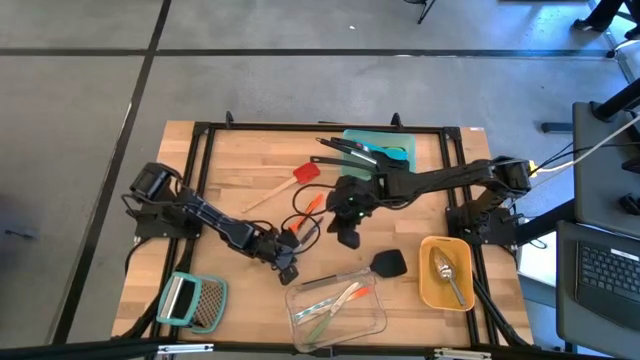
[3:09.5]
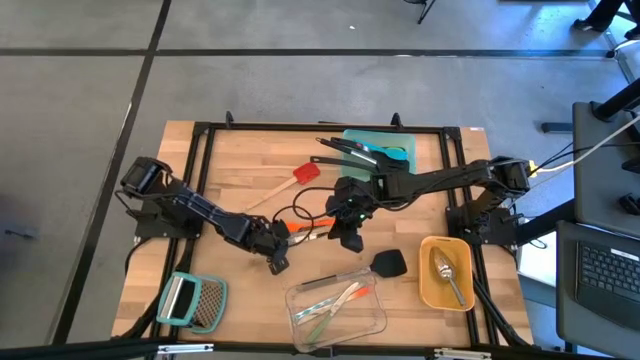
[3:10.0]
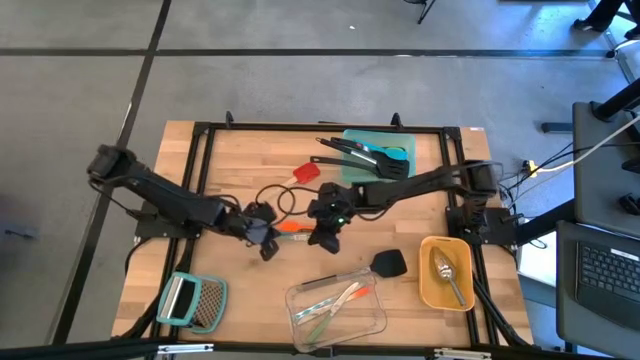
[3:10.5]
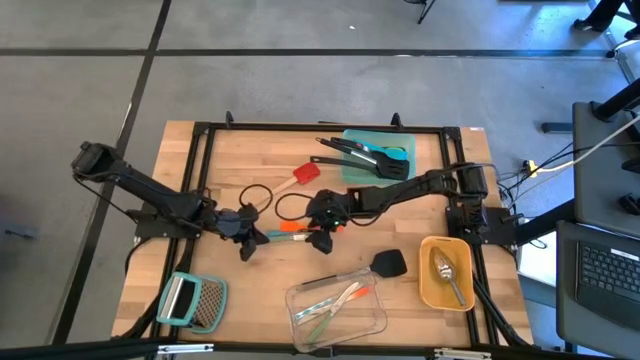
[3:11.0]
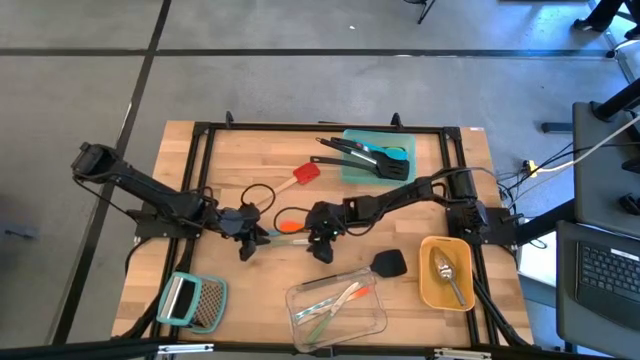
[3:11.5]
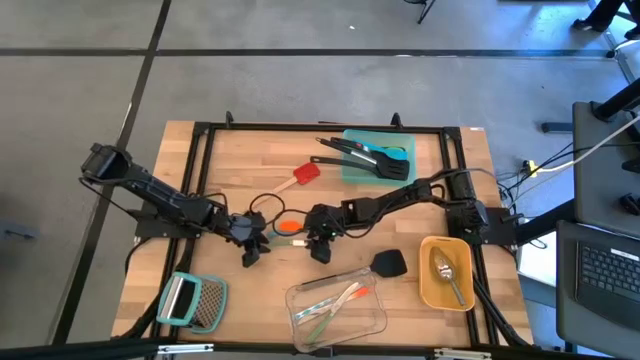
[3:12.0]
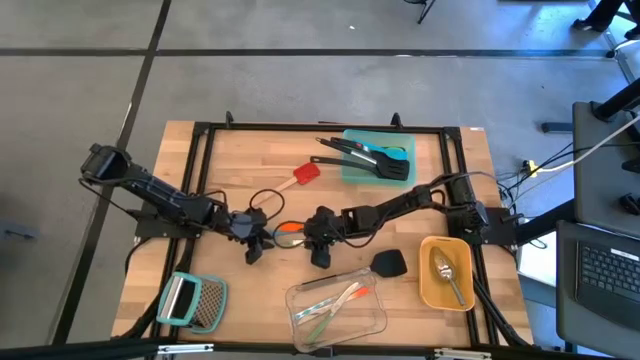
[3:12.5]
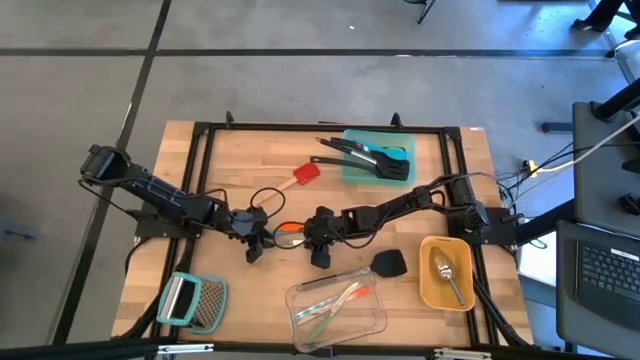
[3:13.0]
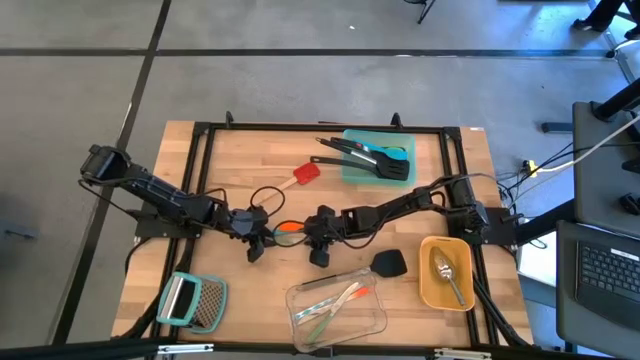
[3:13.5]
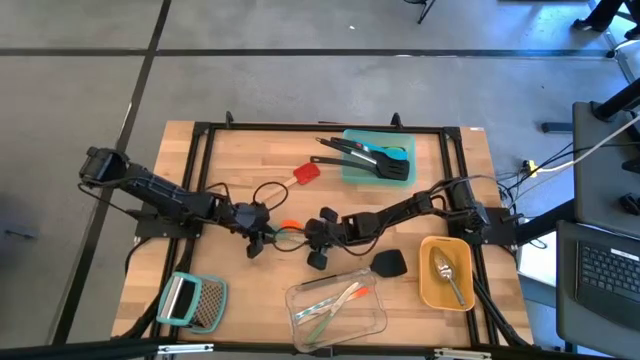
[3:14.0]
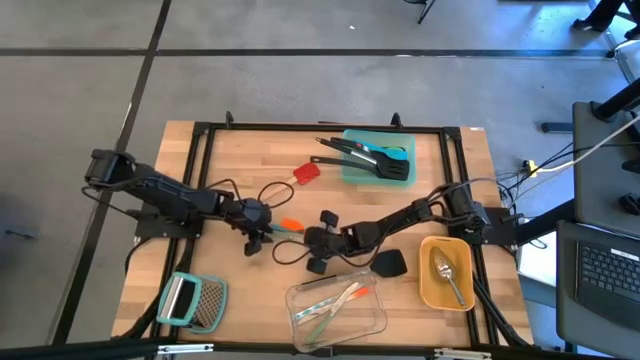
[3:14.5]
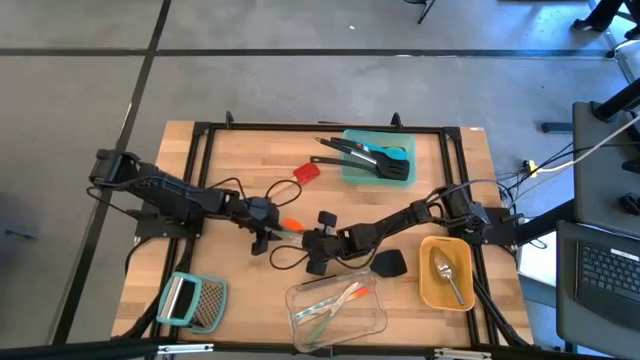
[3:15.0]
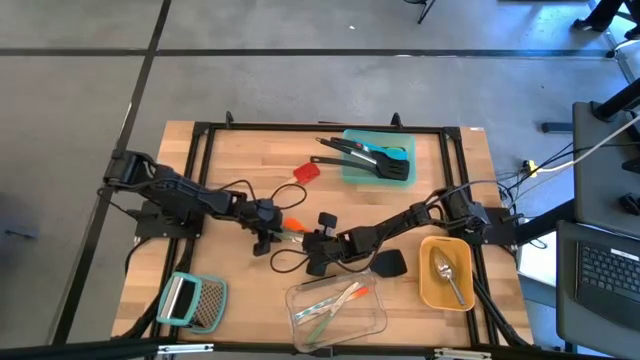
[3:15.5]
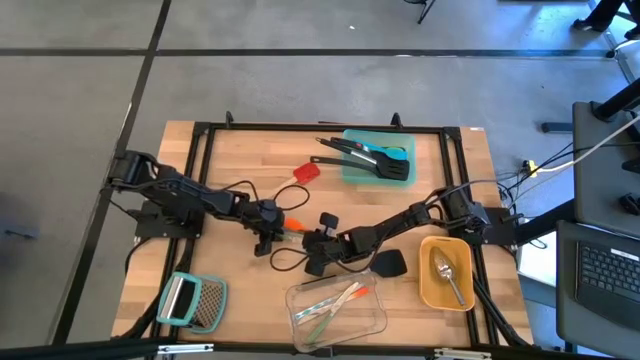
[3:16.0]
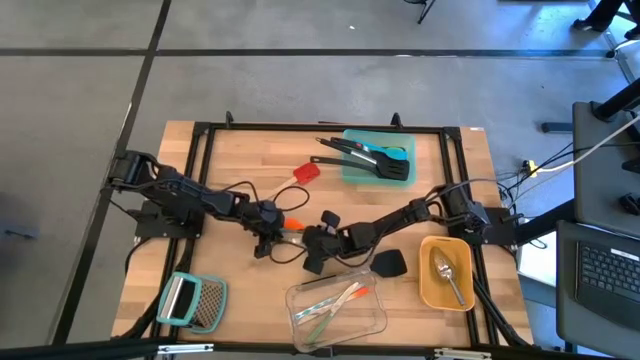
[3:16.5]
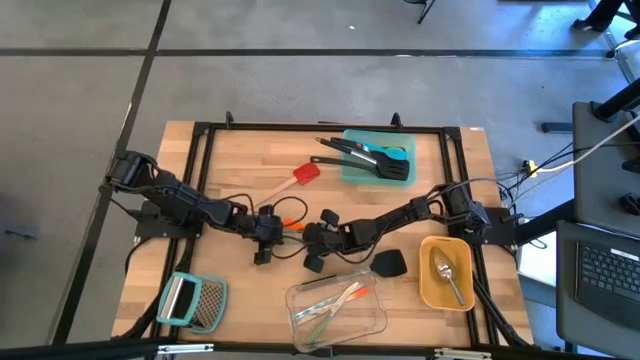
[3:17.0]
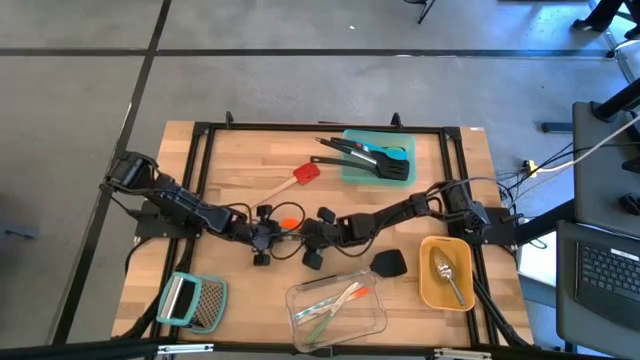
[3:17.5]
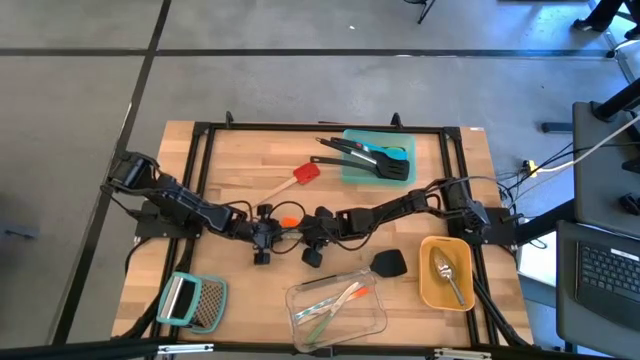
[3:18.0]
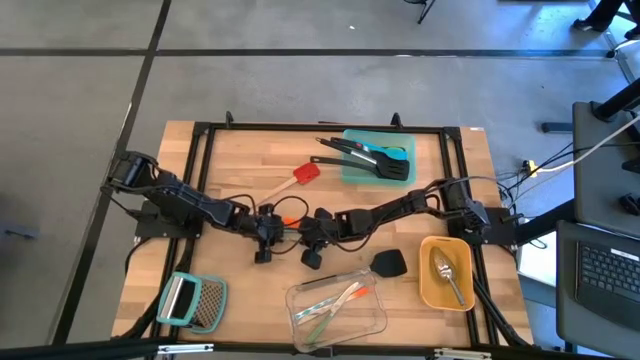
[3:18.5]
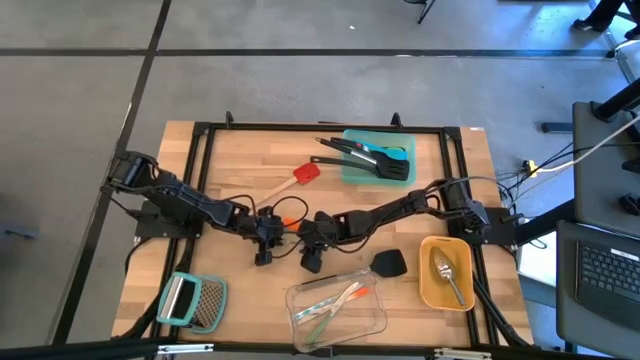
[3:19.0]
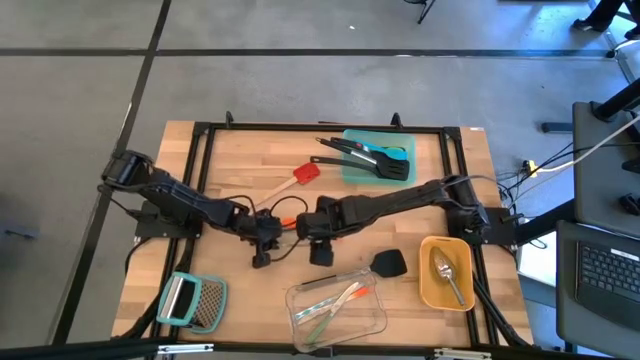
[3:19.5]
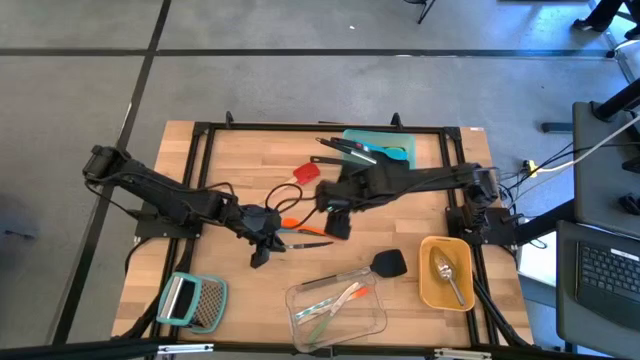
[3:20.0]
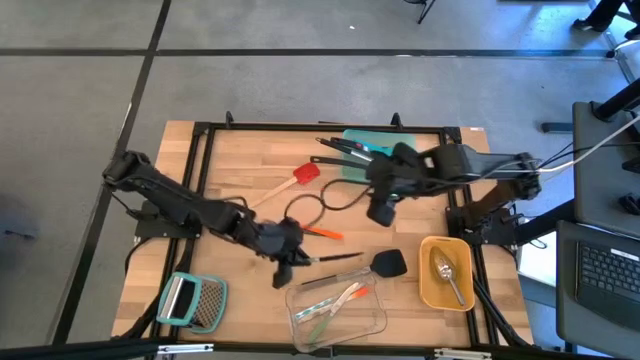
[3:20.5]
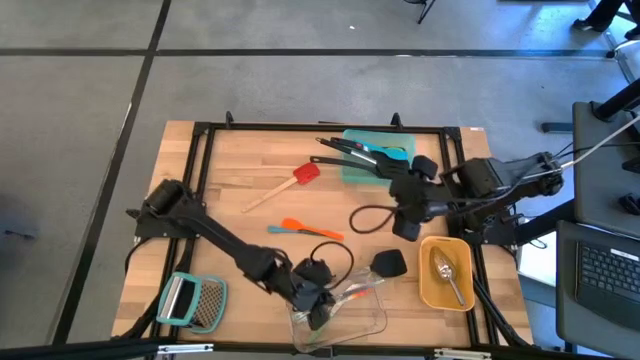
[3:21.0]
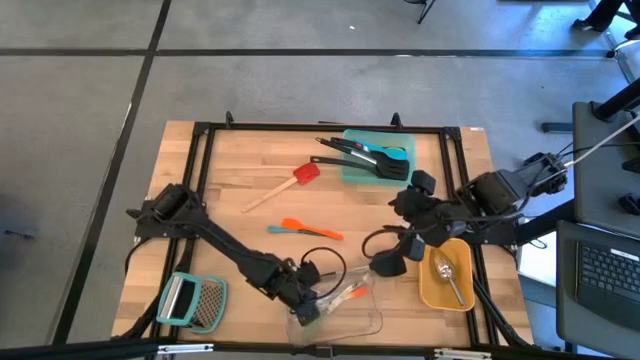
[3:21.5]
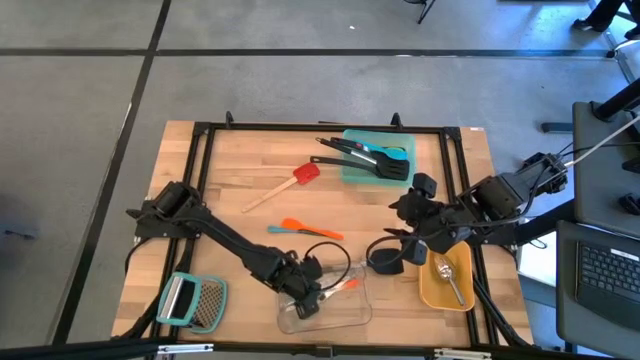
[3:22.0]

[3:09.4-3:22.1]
Task: Pick & Place Kitchen Items
Put the green table knife into the transparent bin

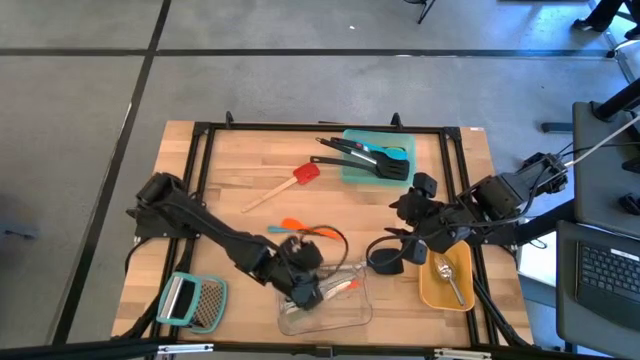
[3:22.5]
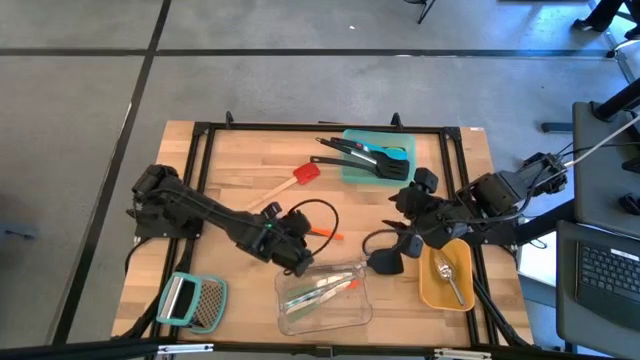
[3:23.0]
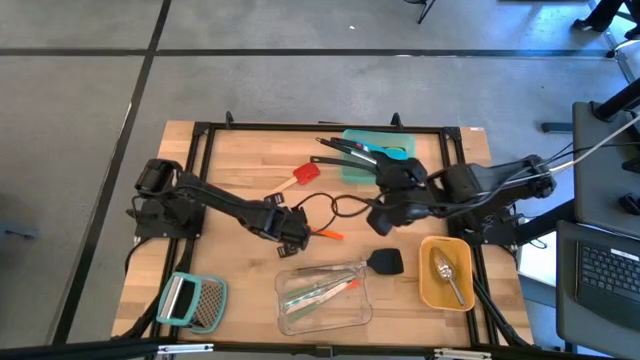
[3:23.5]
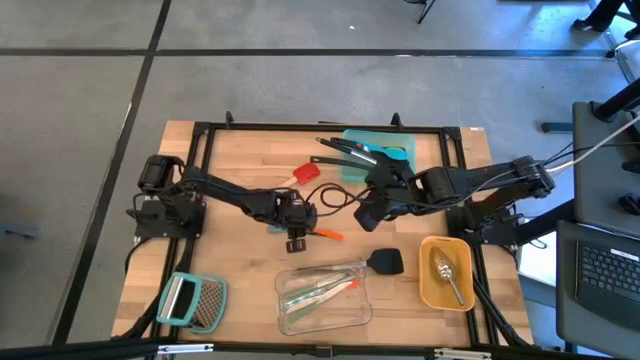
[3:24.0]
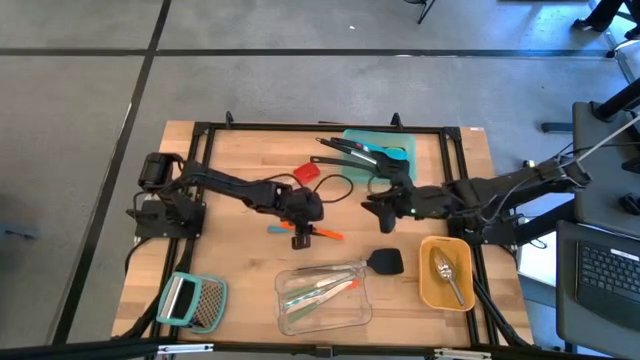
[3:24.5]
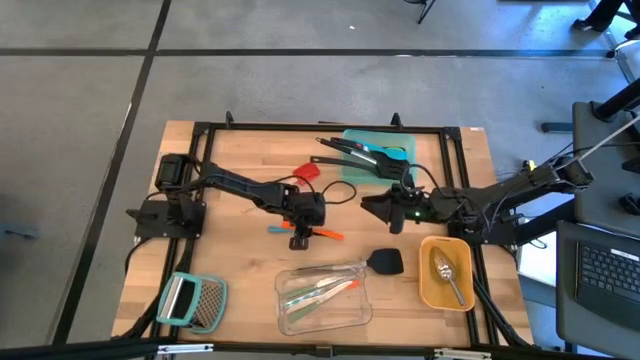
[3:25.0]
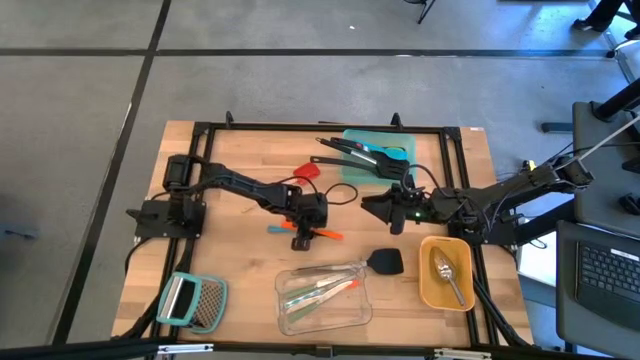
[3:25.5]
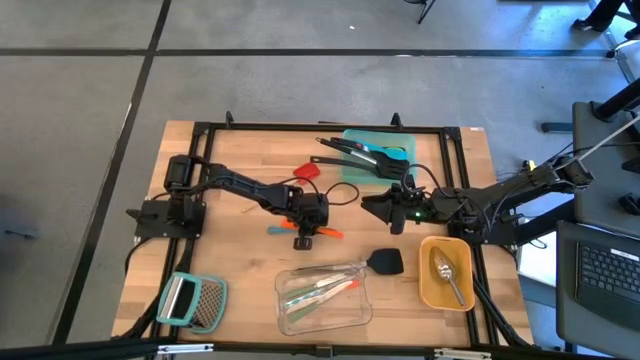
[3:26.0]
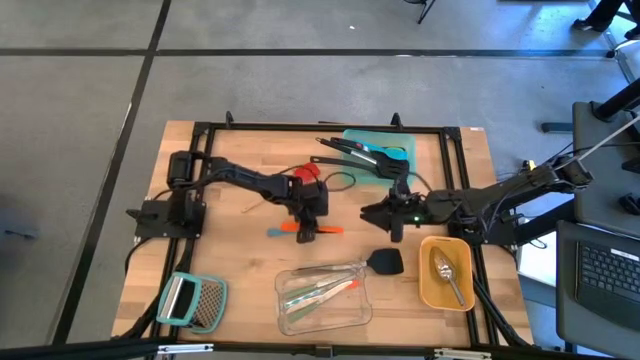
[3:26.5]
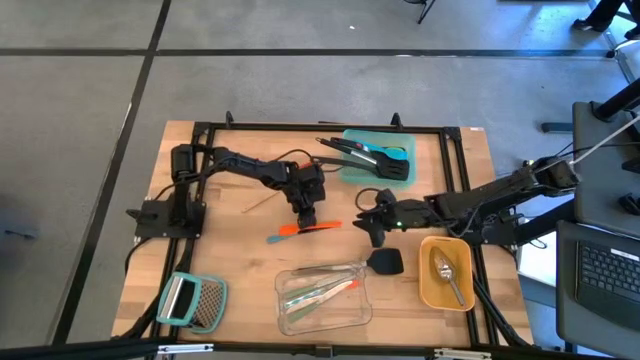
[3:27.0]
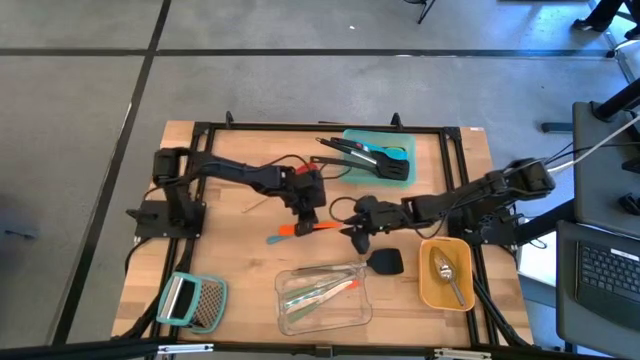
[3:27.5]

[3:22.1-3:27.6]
Put the orange spatula into the green bin

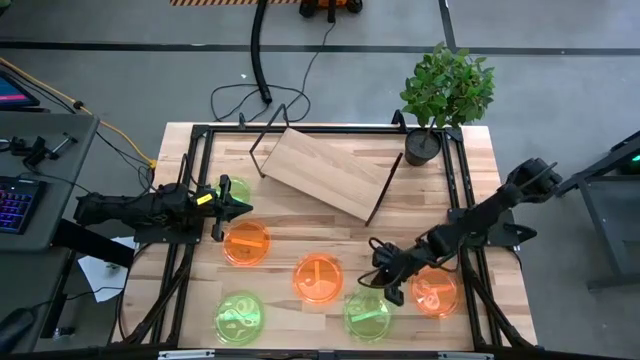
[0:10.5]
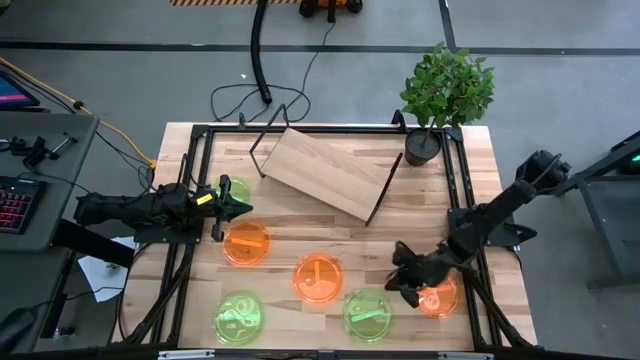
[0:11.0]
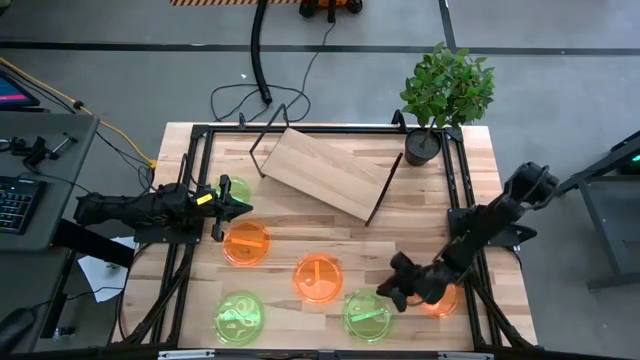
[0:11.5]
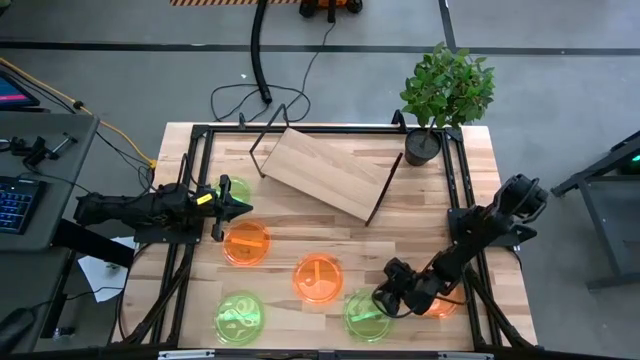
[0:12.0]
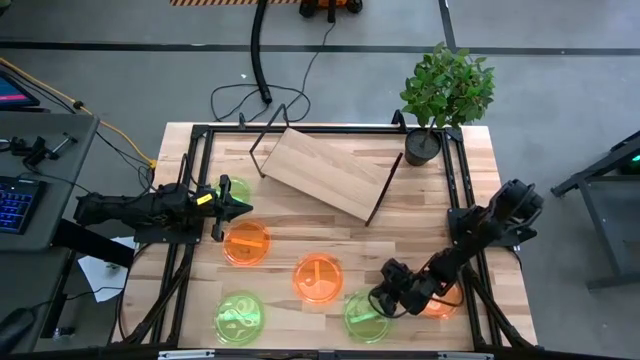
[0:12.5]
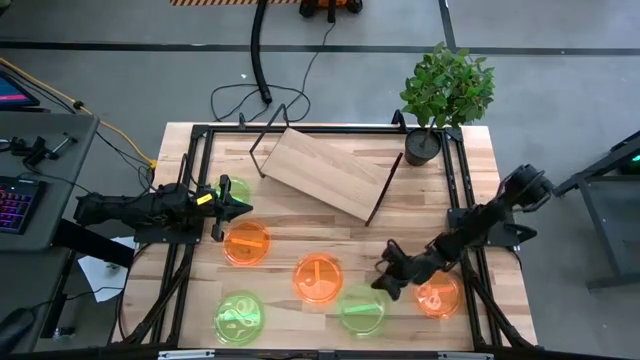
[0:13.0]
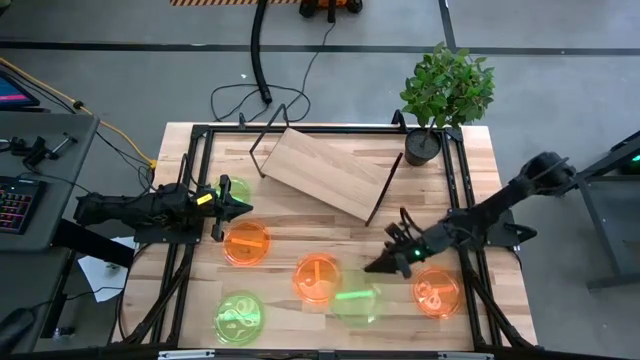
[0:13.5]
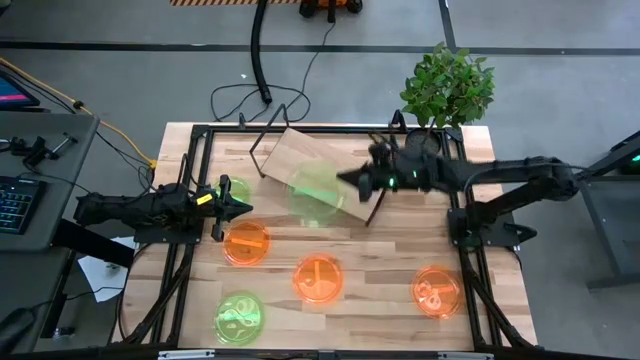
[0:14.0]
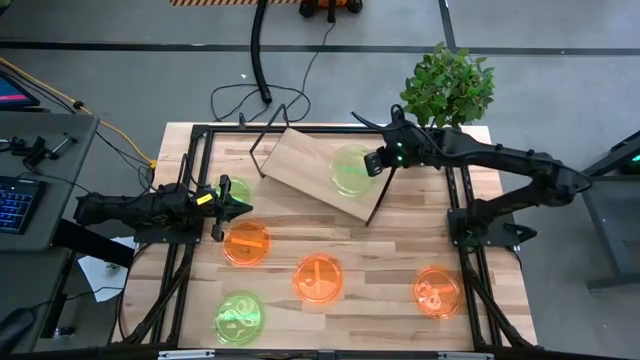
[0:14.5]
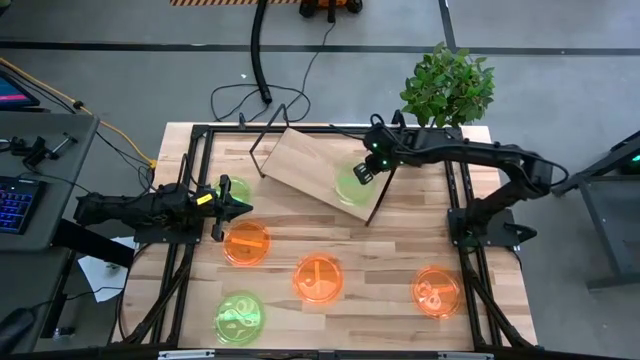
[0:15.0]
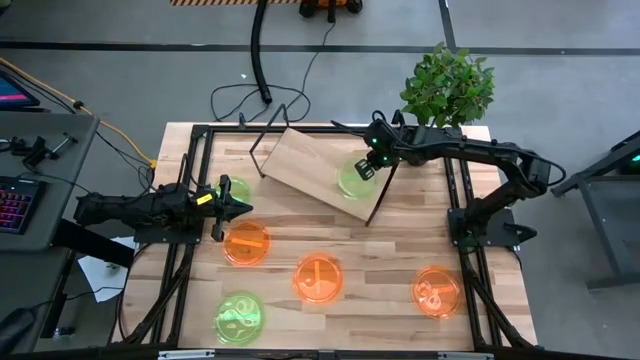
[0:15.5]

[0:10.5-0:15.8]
Task: Place and stack plates onto a shelf
Put the bottom right green plate on top of the shelf
